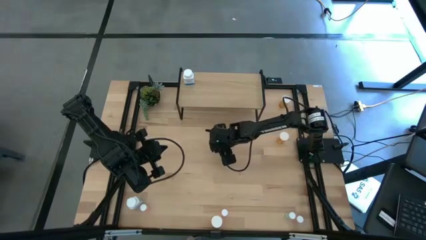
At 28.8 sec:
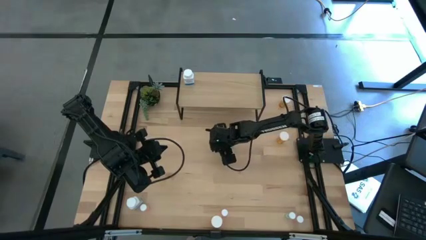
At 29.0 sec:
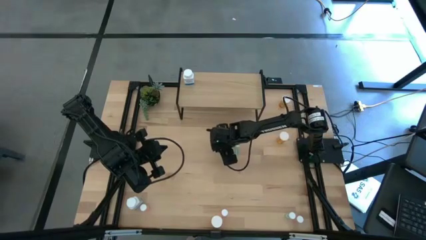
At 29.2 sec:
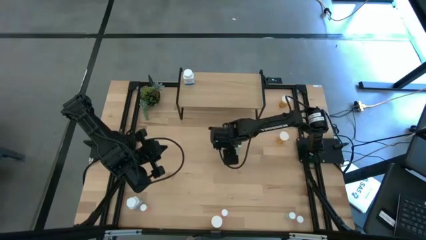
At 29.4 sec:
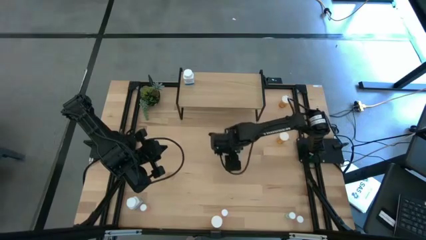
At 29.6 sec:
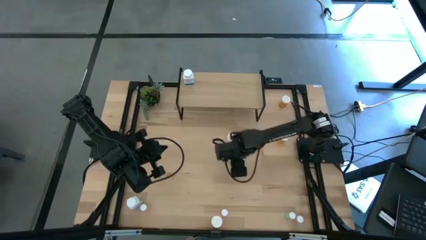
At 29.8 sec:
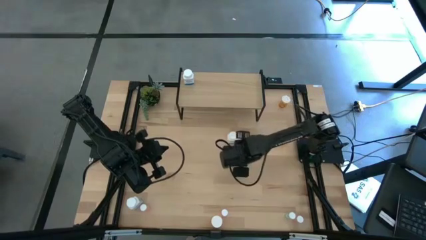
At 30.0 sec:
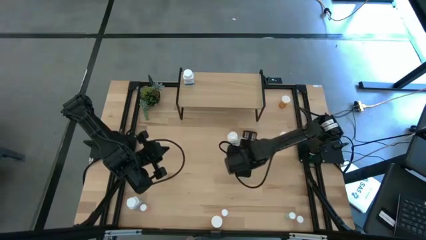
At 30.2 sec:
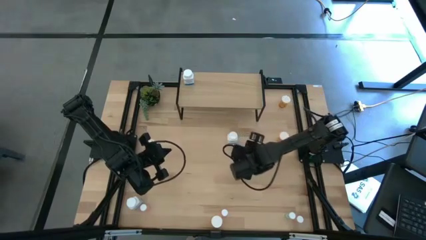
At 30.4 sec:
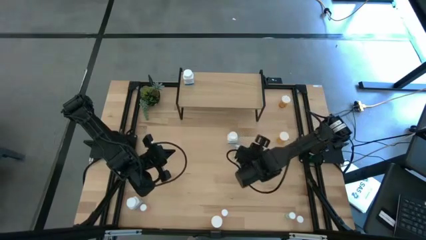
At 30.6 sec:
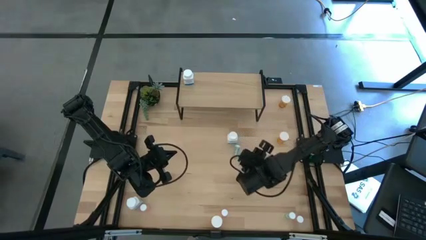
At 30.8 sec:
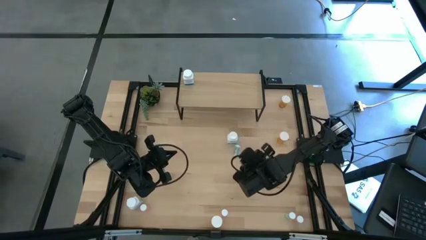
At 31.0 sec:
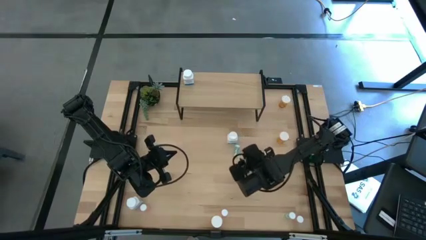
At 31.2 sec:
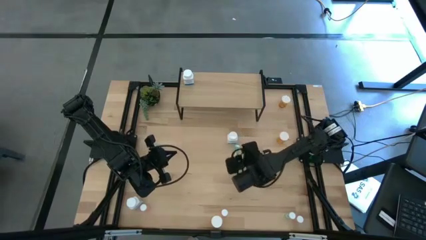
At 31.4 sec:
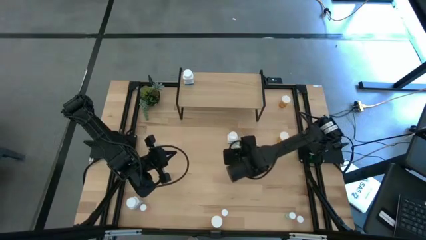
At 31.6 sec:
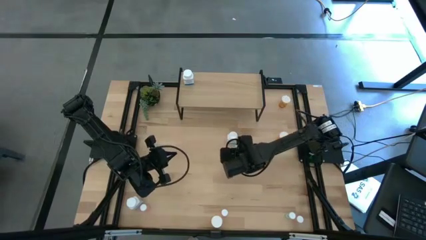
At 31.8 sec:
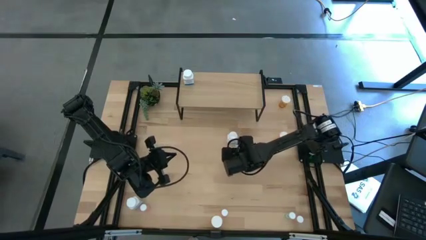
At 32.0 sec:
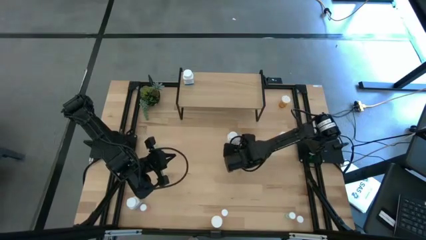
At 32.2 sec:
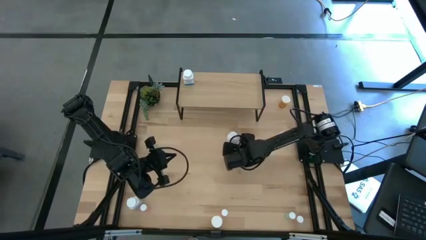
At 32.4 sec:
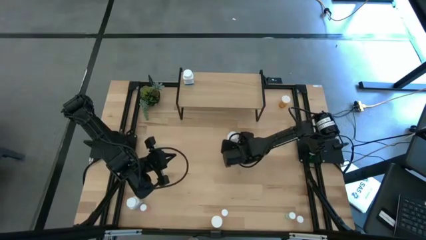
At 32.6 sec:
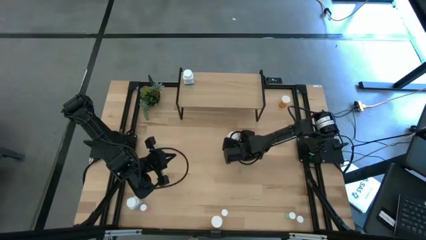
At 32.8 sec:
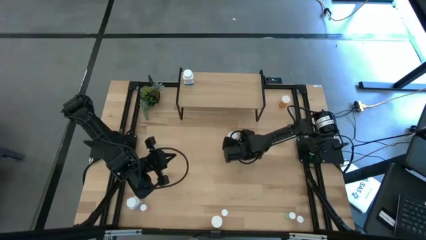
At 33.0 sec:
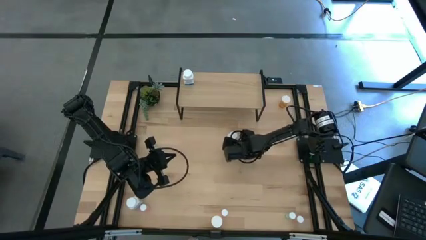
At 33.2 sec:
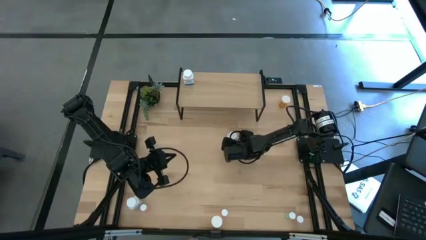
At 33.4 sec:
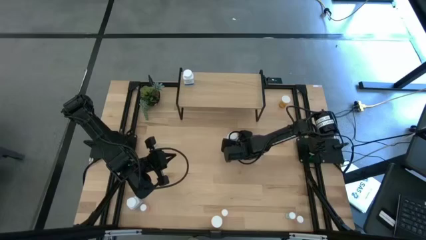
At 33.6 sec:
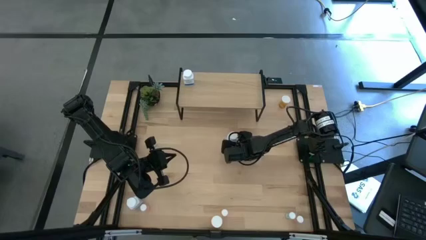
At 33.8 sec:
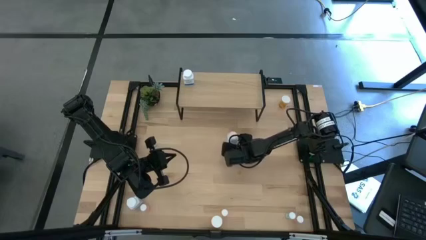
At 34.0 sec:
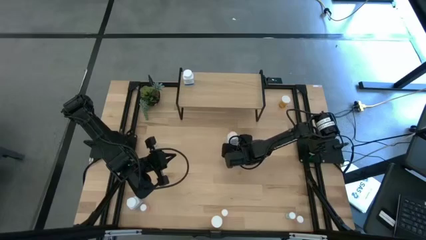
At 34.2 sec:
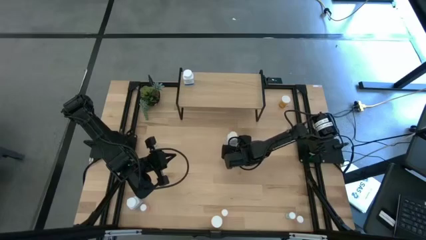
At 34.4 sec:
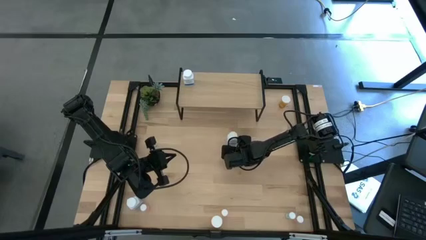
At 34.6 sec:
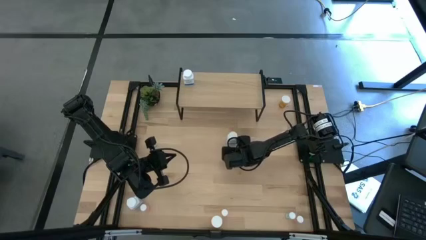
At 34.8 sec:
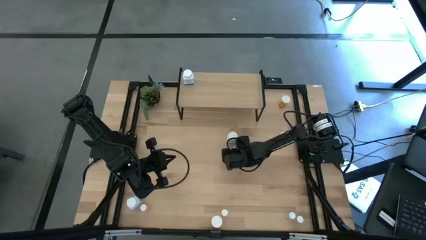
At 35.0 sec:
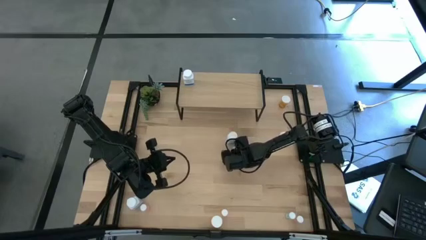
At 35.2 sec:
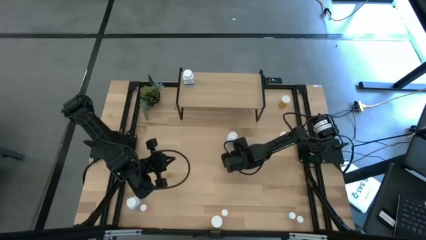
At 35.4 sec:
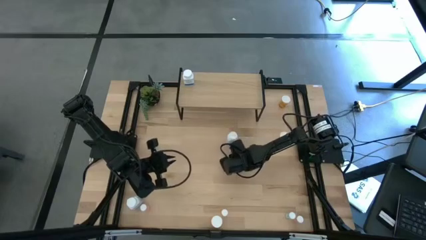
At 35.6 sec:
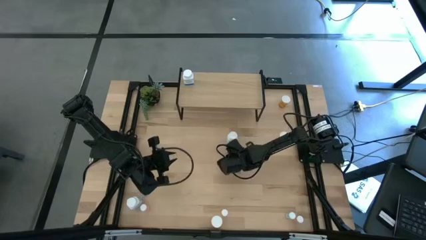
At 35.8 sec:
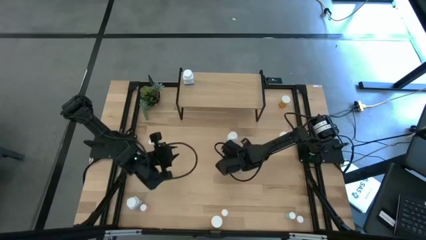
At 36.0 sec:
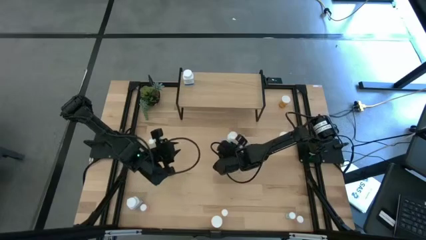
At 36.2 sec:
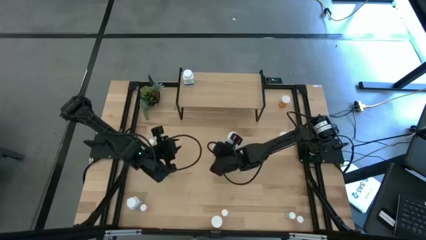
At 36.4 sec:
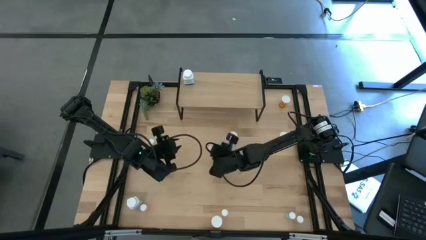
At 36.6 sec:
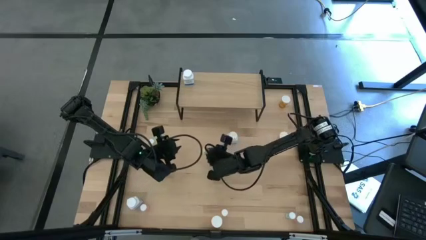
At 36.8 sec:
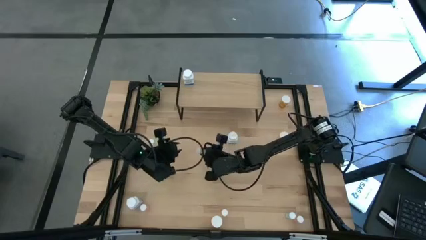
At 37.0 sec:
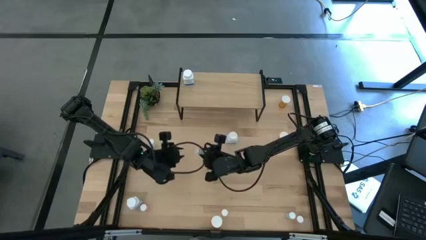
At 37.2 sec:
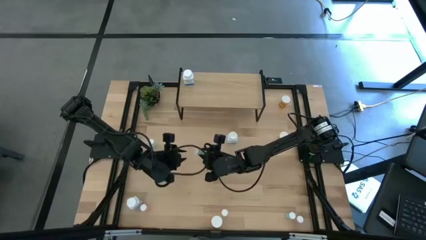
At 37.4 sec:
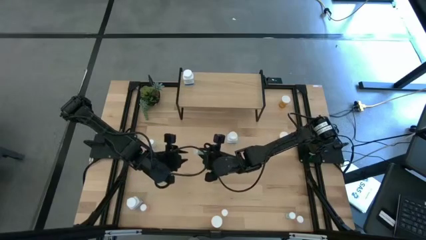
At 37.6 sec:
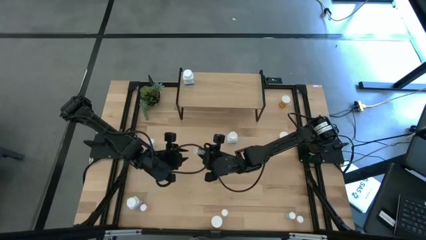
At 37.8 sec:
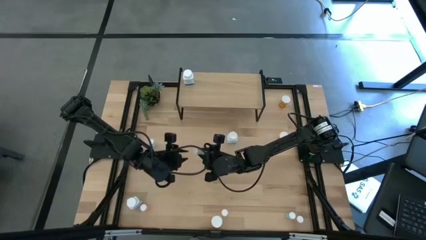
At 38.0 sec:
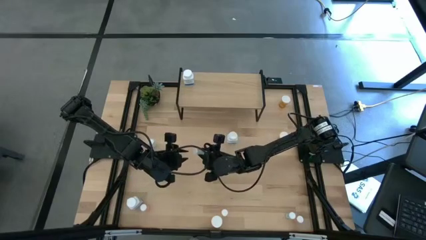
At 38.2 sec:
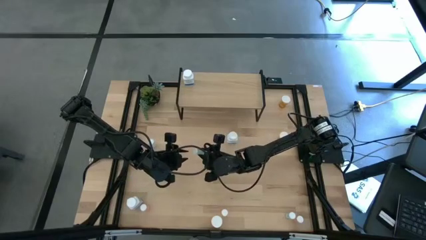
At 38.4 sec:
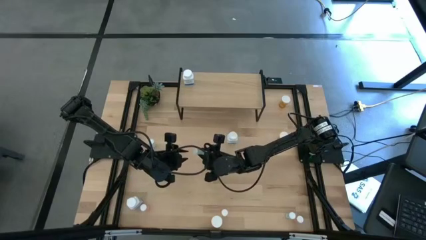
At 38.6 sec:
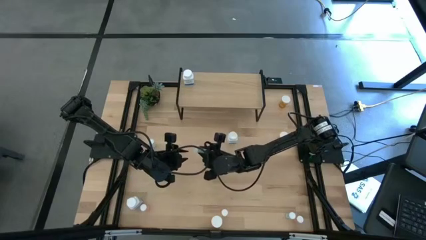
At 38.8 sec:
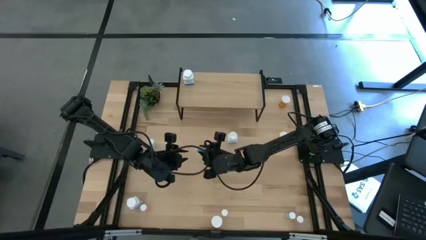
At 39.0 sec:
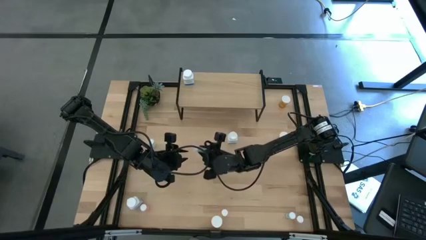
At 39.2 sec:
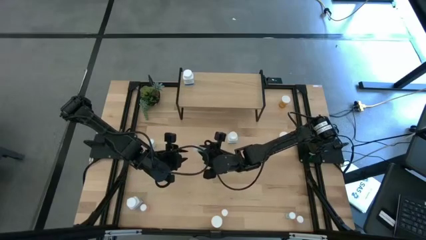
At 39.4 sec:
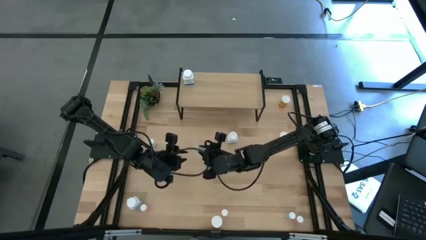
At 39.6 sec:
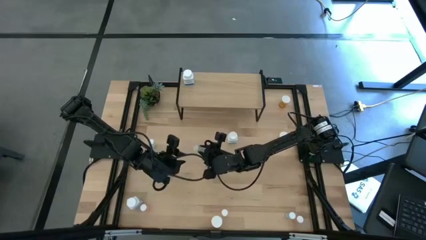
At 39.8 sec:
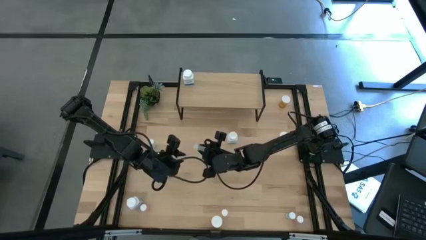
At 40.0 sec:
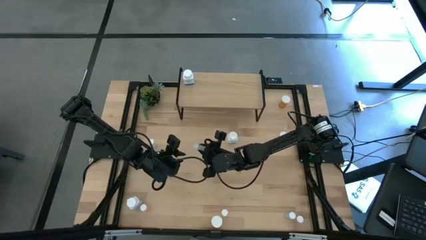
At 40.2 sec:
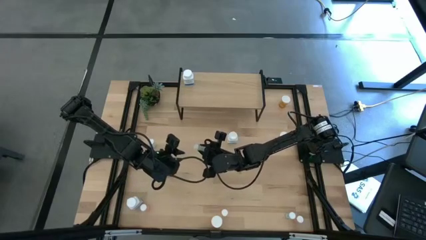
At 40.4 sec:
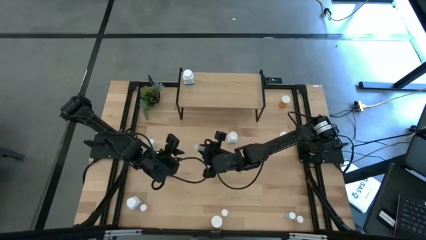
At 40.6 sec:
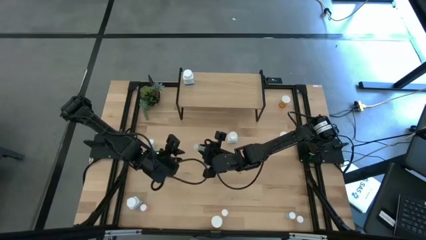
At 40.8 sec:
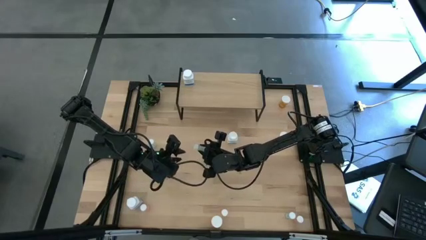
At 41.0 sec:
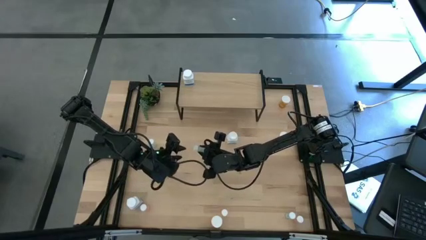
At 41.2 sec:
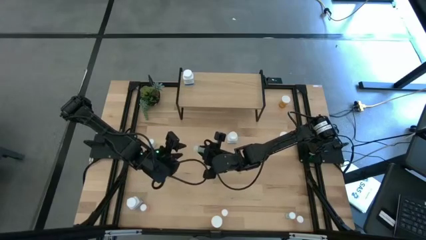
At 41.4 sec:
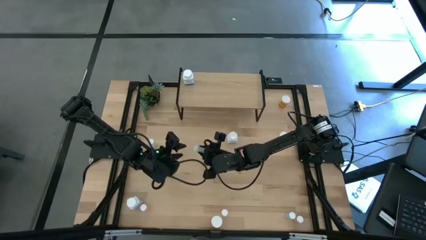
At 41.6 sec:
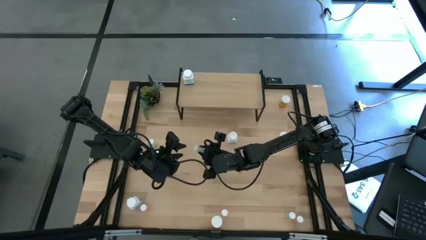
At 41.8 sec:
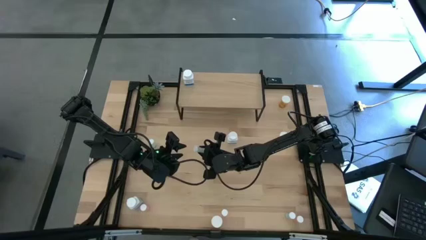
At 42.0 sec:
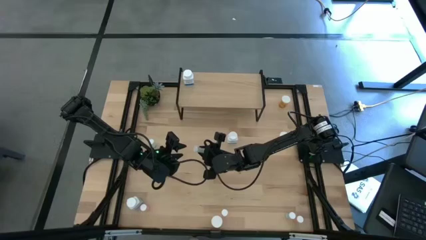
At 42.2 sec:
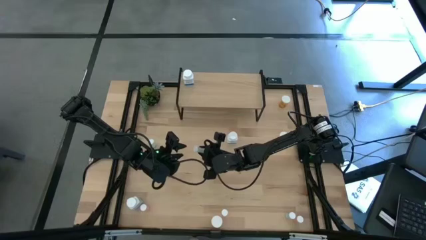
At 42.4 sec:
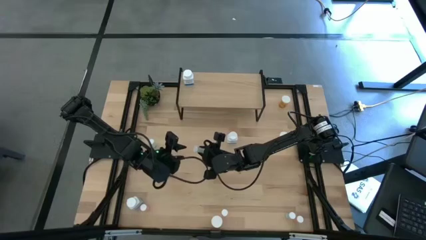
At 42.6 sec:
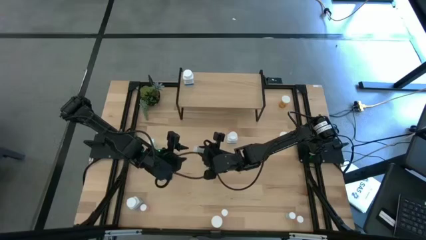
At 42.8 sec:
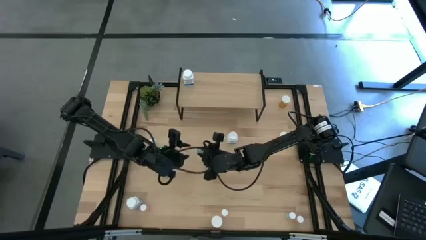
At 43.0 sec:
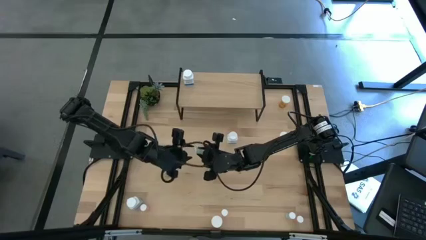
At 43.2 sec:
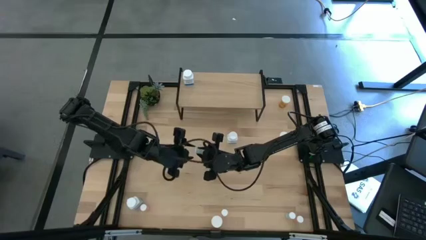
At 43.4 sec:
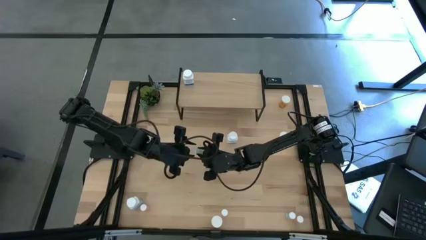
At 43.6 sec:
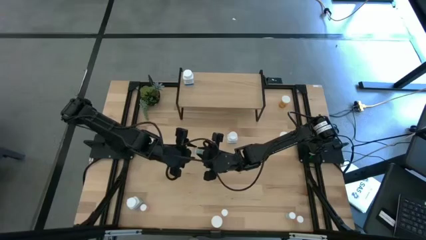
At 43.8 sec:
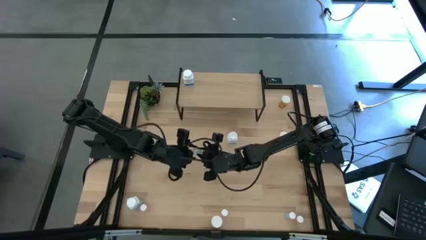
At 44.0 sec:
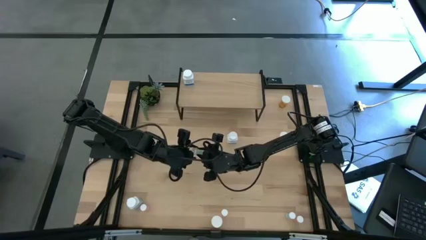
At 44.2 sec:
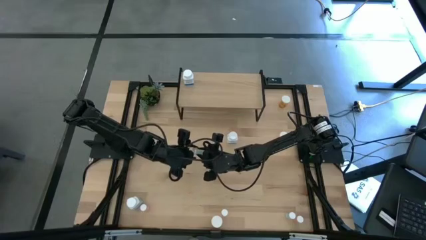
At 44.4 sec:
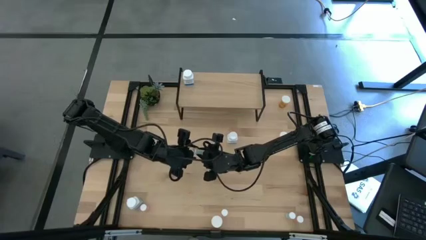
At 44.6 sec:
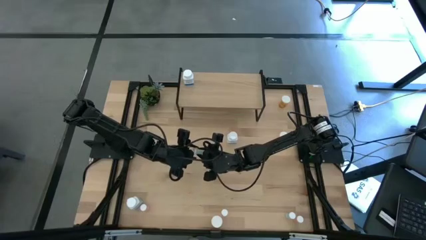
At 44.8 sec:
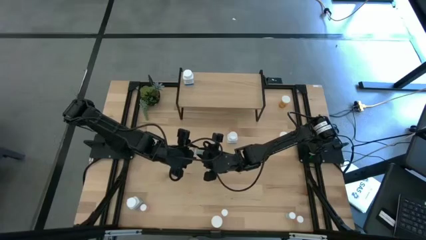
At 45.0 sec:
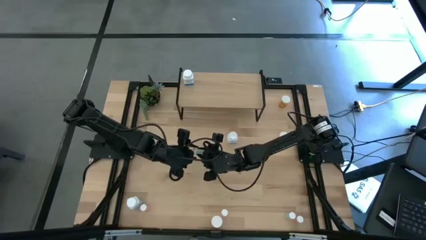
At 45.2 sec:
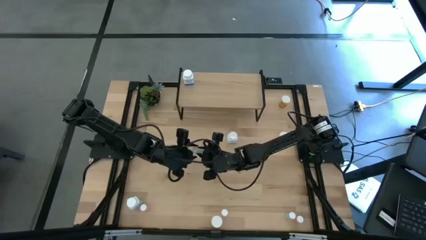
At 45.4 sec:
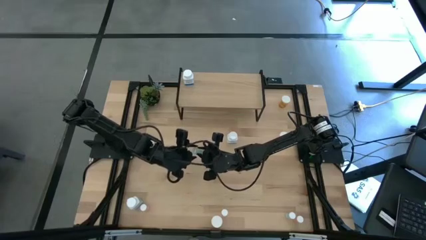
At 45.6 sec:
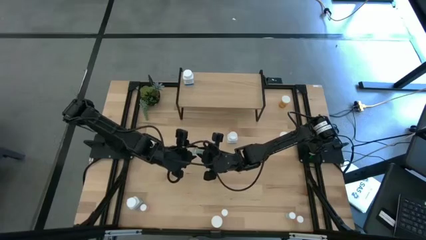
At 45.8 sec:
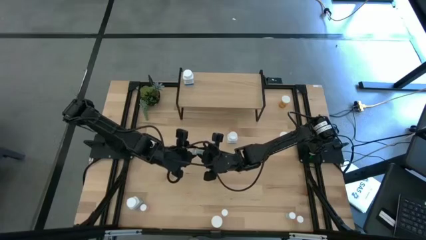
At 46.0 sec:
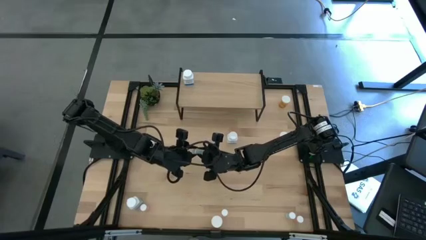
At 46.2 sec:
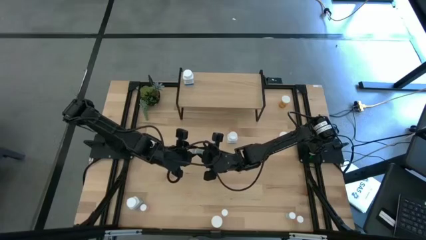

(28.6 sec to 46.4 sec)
Task: Pick and place medicine bottles onto shelf by color
Put the top right blue pill bottle on the shelf
